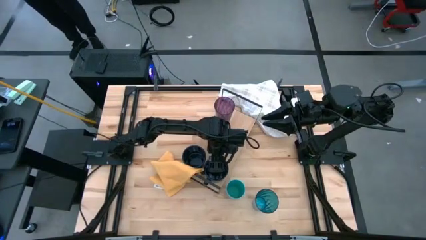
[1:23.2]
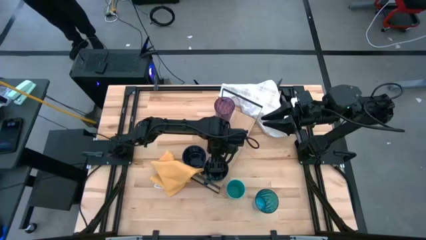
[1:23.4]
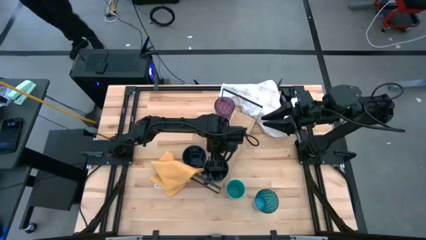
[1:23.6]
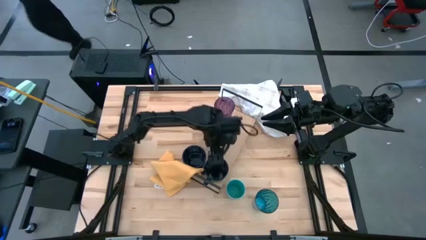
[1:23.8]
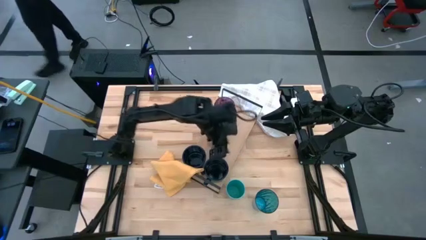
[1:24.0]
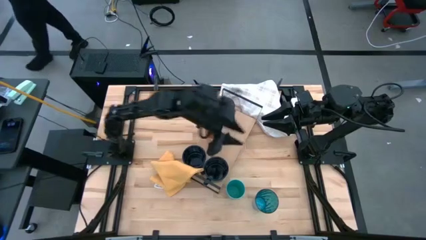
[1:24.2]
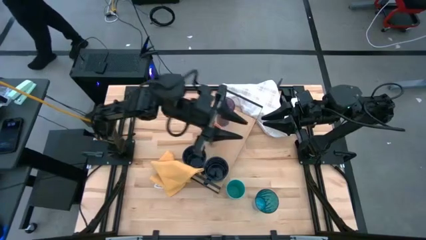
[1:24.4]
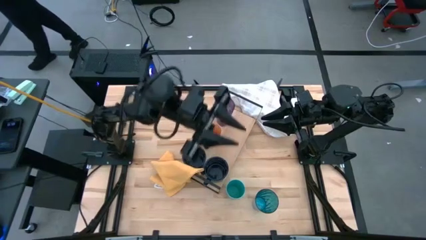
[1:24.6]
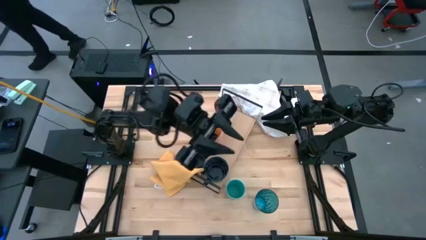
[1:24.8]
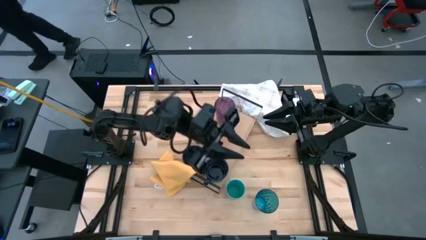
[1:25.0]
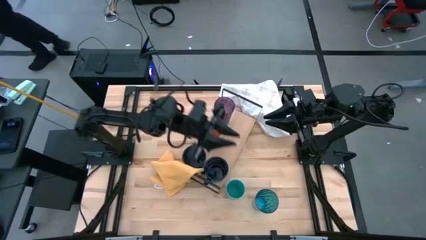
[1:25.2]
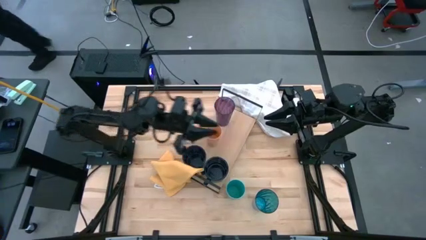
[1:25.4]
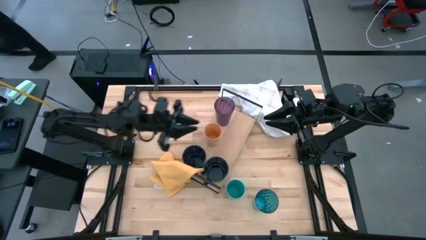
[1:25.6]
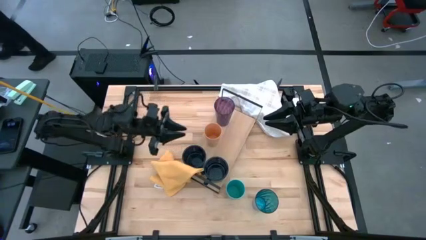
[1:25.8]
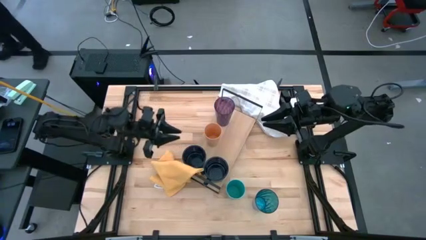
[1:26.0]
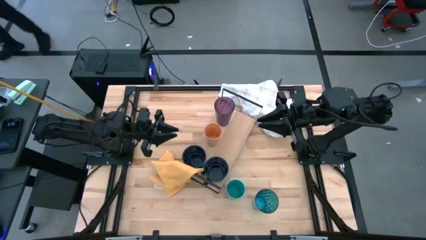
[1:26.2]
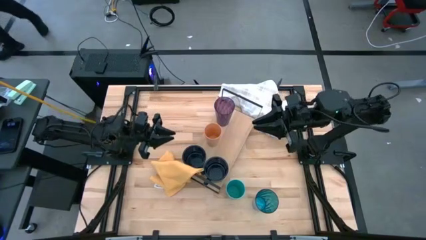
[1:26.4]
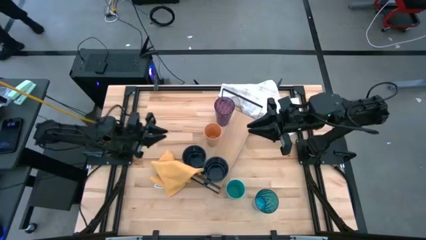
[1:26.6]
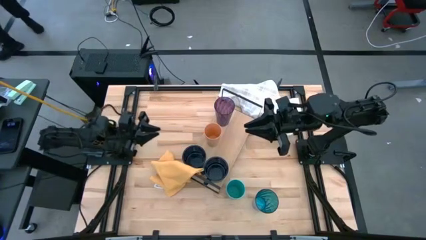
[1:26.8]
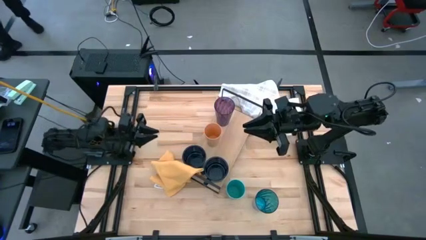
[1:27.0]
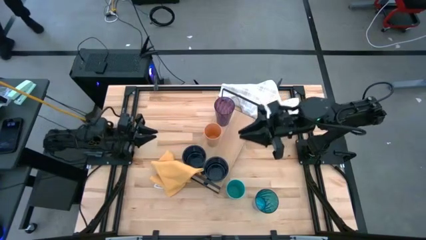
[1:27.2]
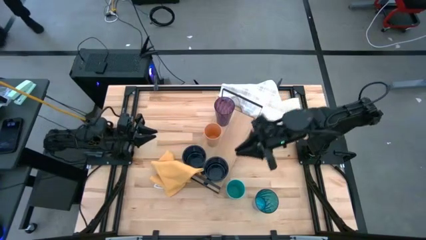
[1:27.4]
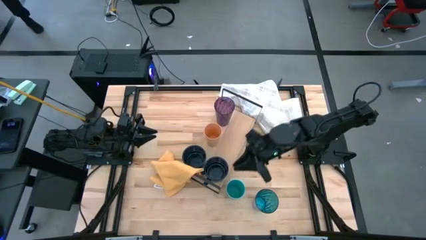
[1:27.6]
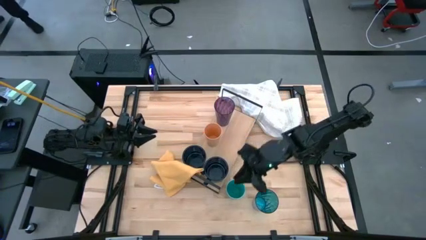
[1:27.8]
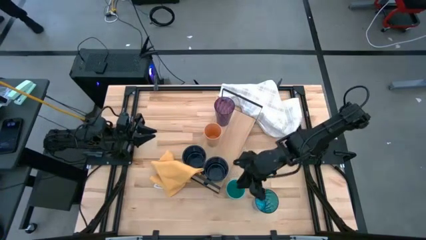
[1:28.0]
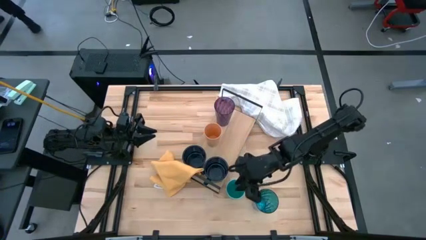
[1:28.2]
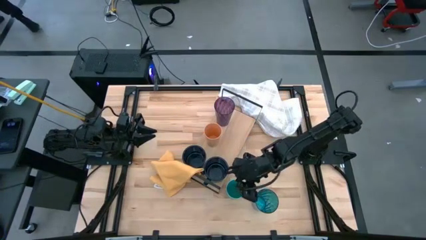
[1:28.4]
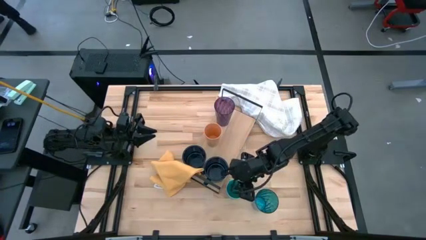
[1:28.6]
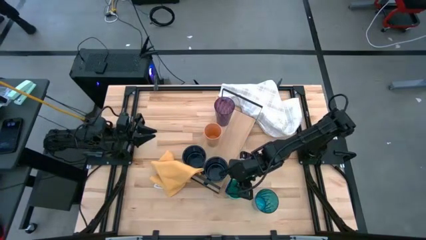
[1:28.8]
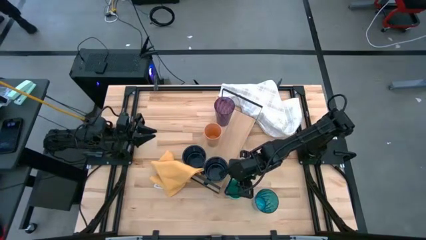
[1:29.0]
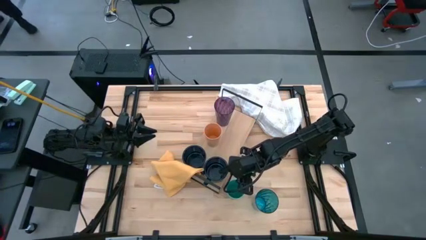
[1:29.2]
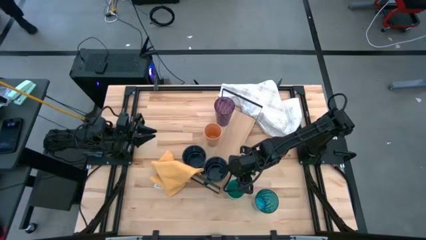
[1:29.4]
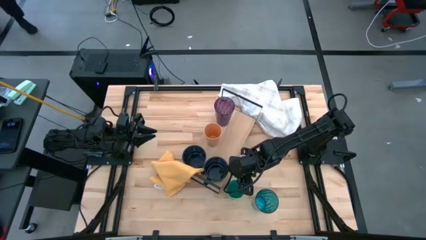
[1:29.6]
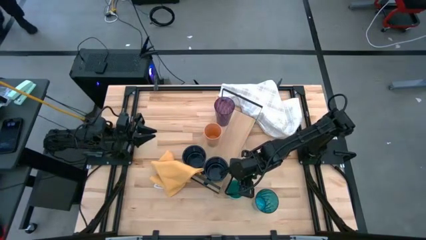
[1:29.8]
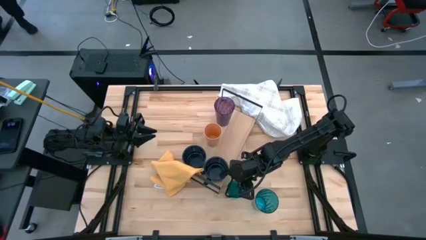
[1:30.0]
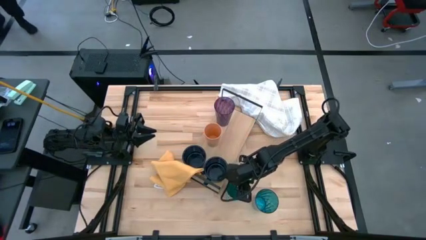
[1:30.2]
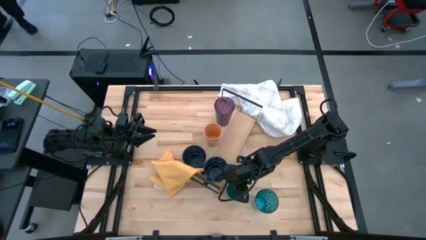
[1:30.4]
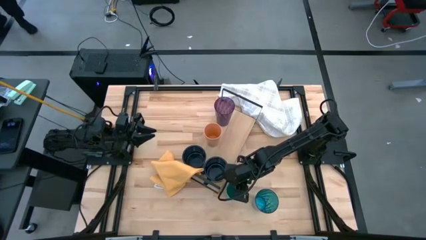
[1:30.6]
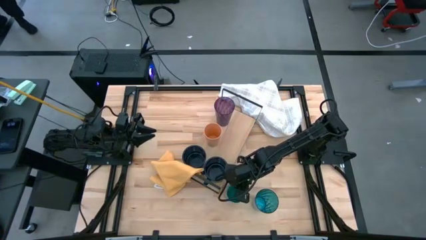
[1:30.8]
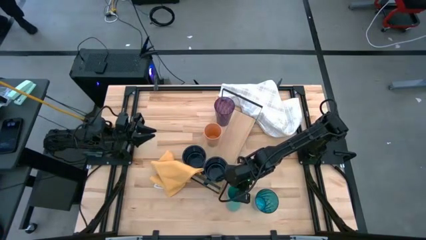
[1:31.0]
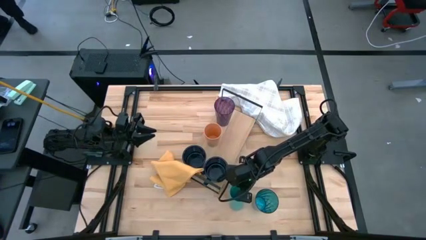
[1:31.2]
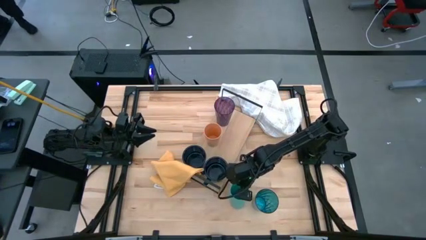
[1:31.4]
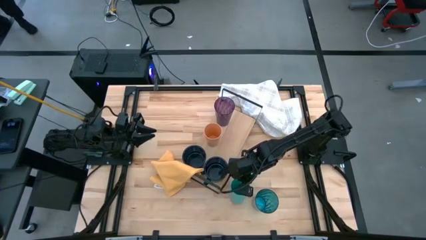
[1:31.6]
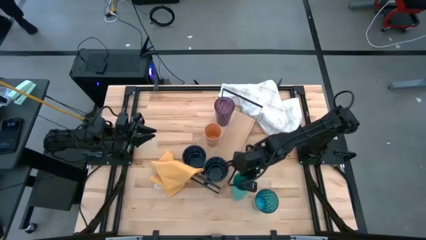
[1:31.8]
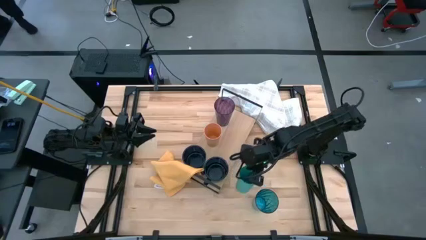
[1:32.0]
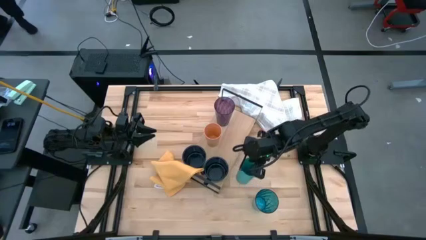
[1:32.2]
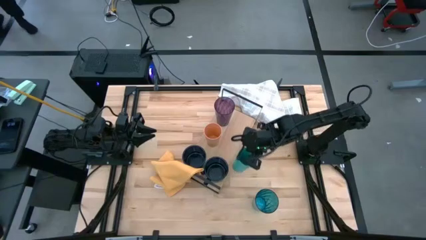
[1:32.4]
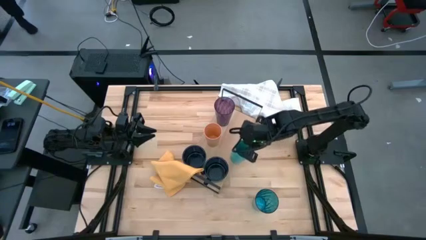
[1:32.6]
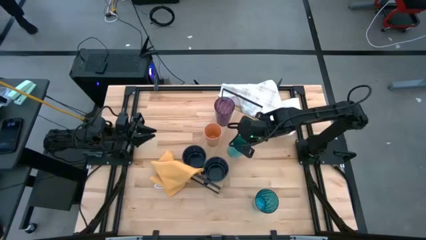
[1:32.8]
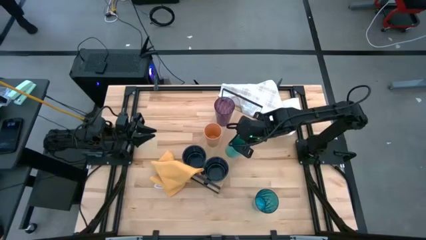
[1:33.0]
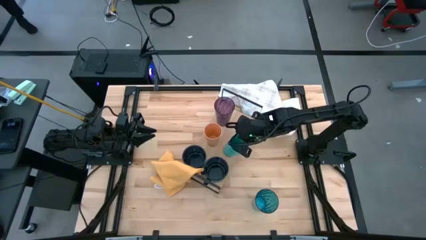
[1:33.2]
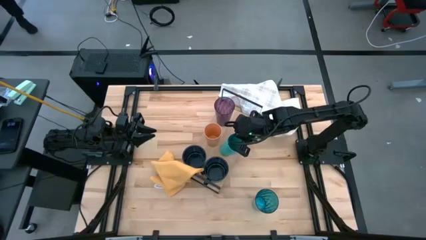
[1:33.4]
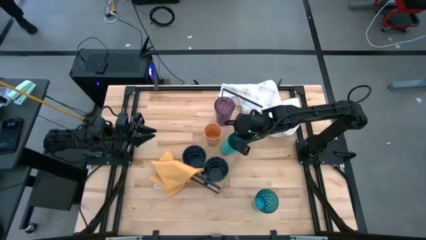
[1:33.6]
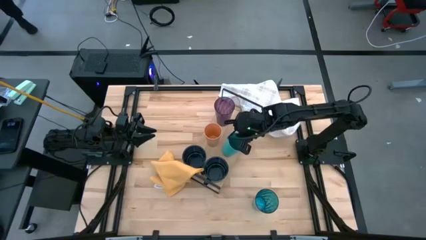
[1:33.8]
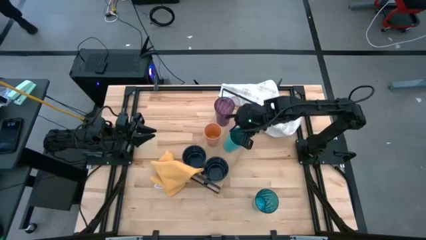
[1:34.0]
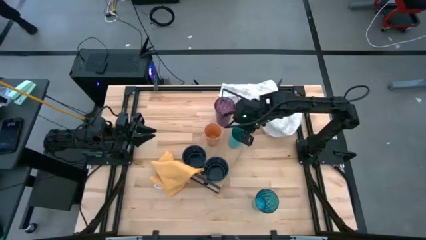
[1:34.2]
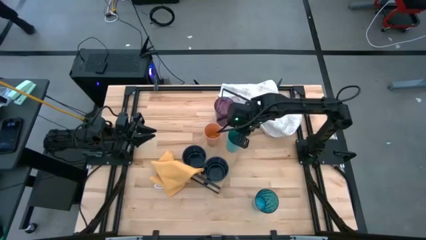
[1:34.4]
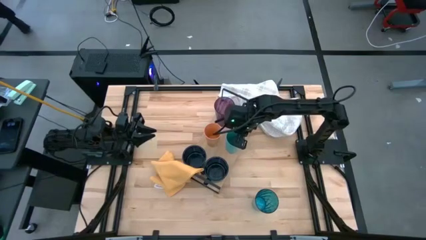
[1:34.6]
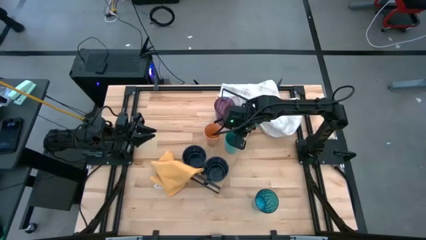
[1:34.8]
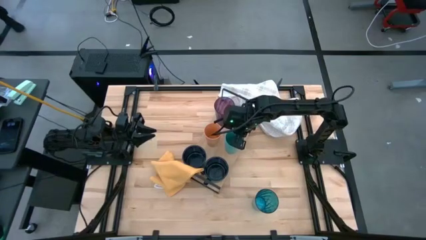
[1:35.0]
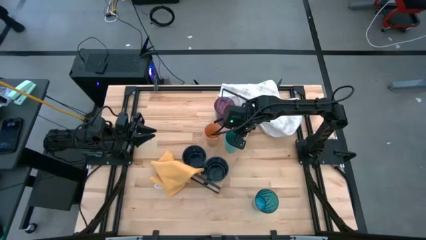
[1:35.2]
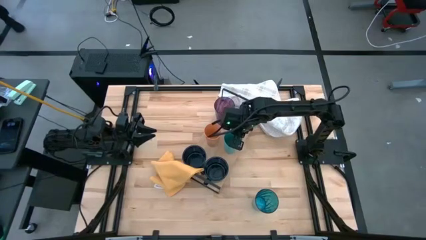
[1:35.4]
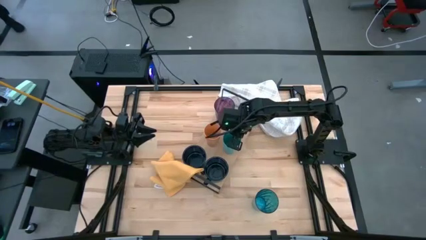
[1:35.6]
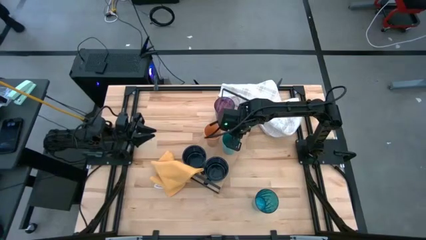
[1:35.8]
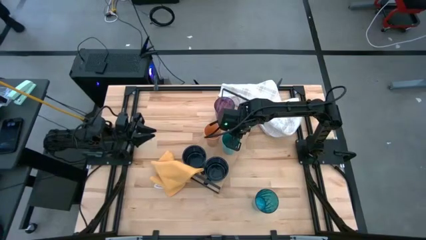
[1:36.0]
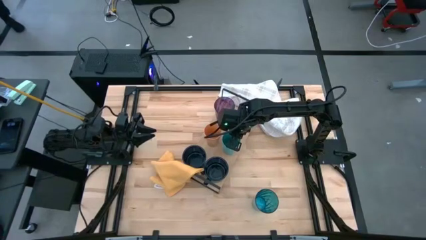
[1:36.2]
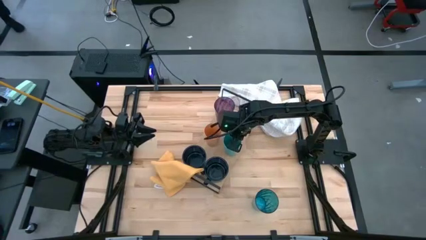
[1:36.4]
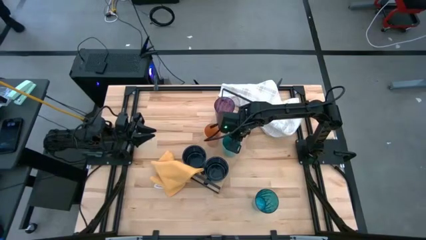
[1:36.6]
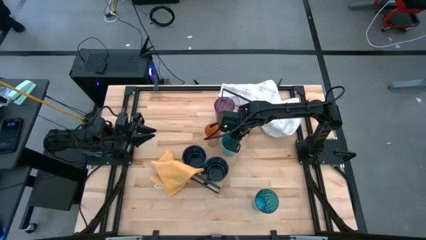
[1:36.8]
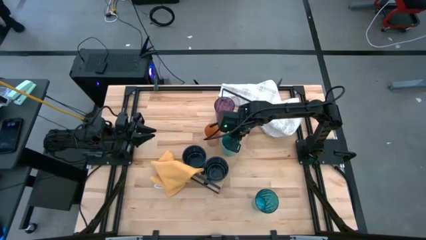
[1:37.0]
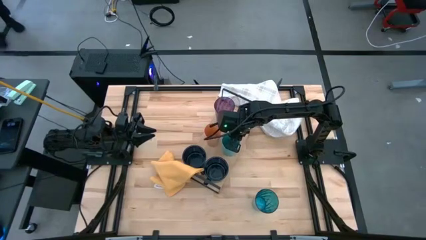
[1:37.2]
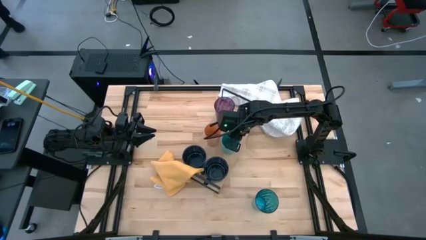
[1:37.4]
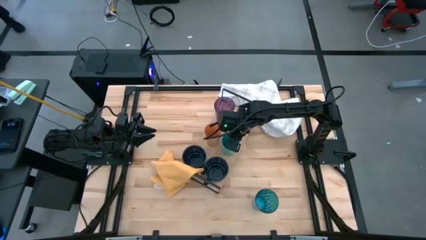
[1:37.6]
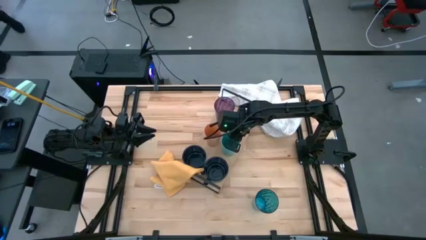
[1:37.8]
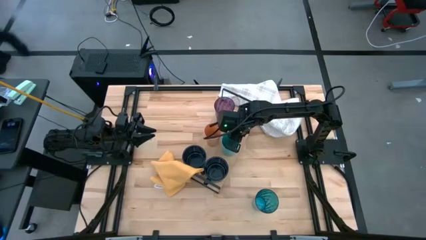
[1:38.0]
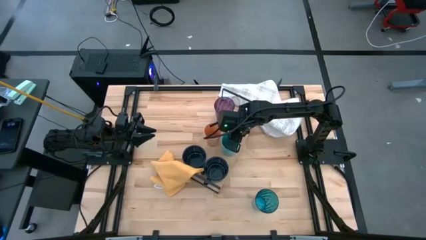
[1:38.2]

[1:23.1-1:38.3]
Task: Stack small to large cups/mugs on shelf
Put the light blue cup on the shelf
